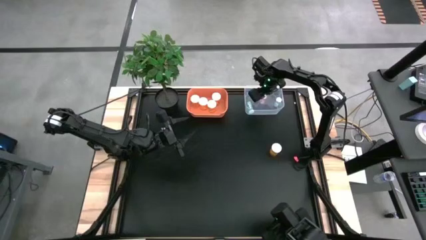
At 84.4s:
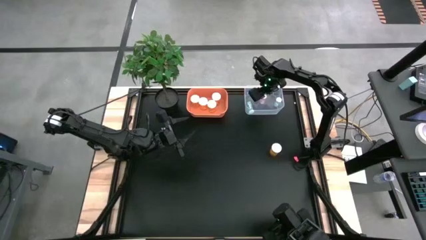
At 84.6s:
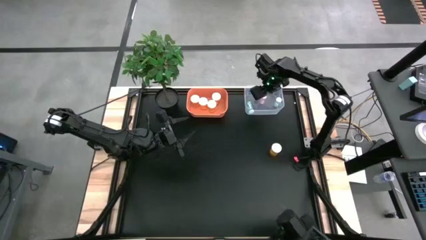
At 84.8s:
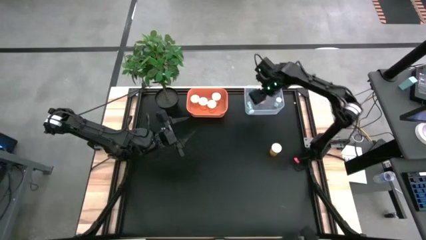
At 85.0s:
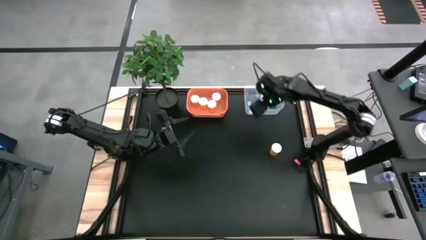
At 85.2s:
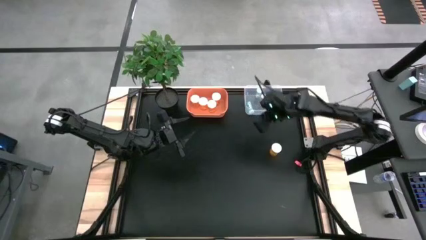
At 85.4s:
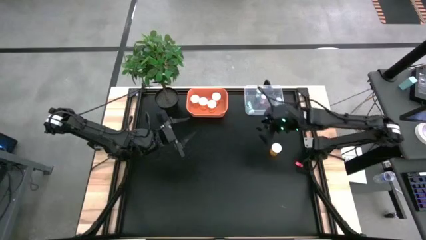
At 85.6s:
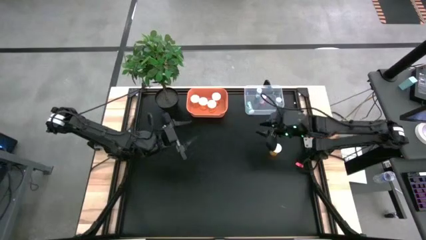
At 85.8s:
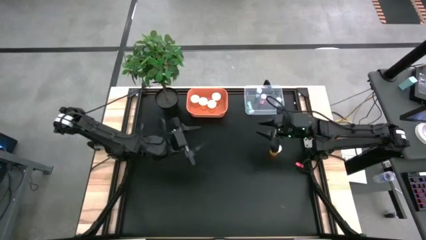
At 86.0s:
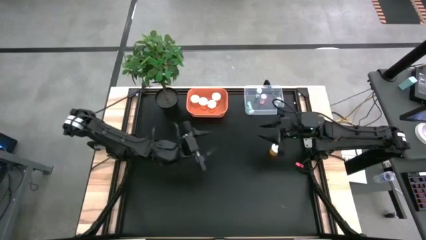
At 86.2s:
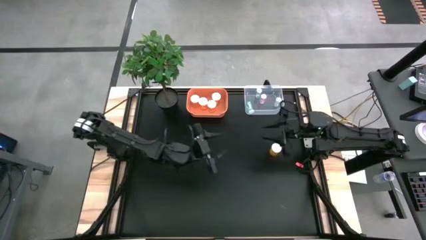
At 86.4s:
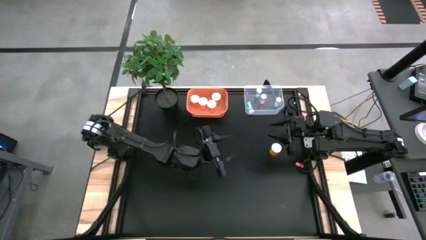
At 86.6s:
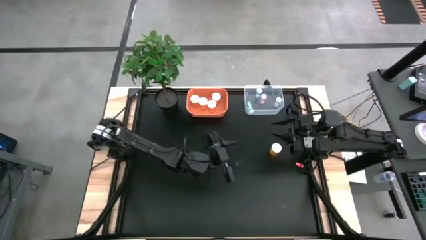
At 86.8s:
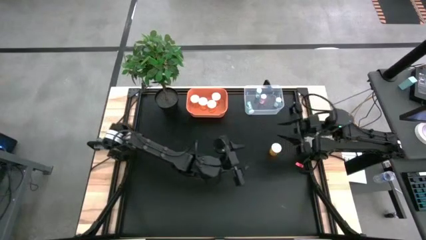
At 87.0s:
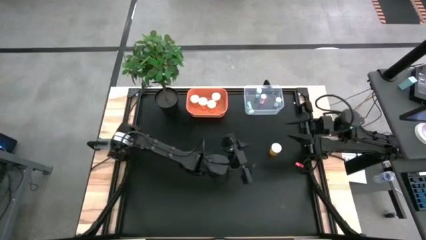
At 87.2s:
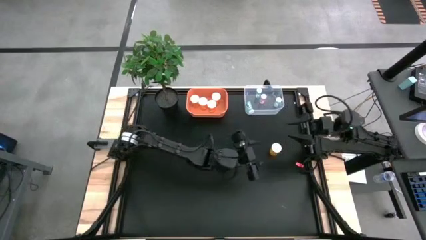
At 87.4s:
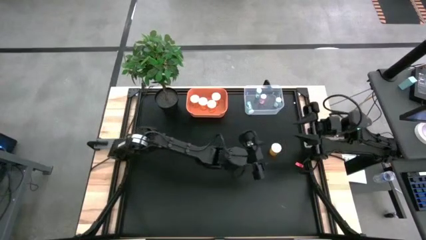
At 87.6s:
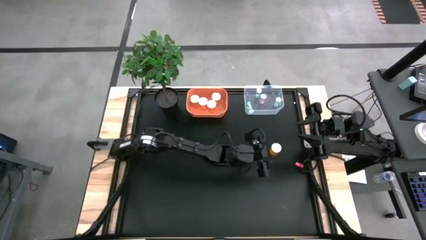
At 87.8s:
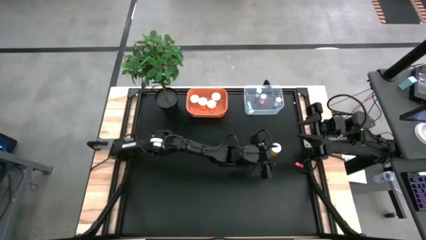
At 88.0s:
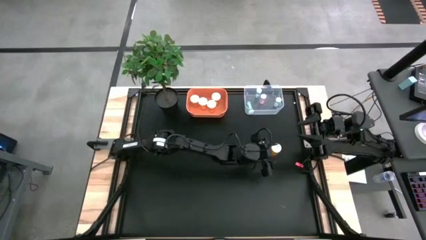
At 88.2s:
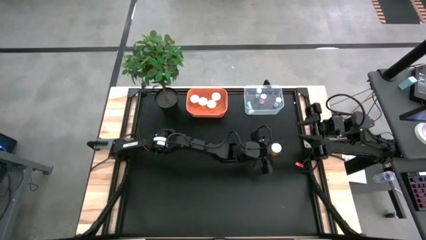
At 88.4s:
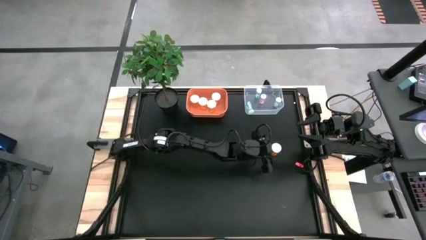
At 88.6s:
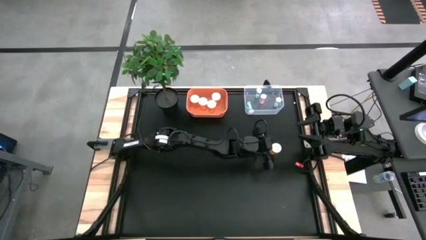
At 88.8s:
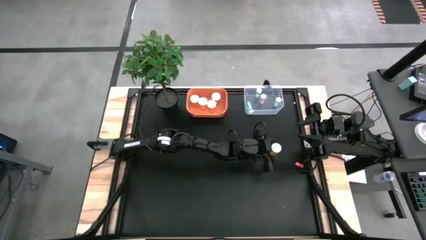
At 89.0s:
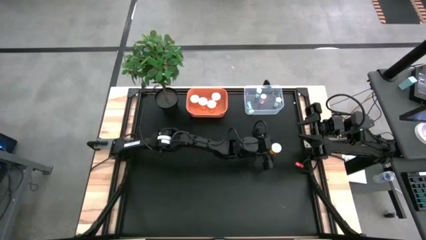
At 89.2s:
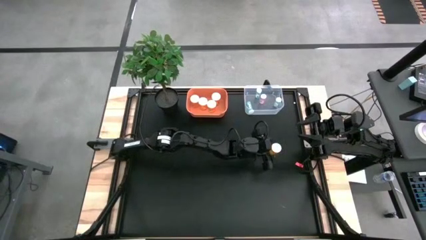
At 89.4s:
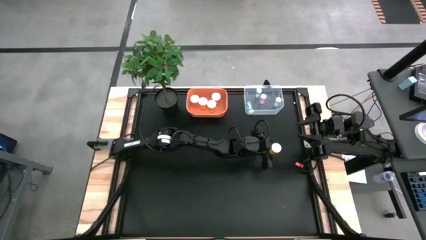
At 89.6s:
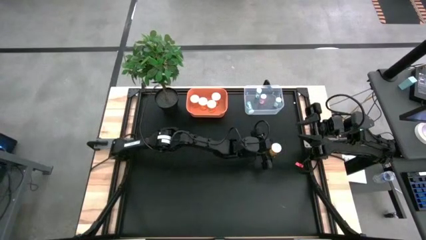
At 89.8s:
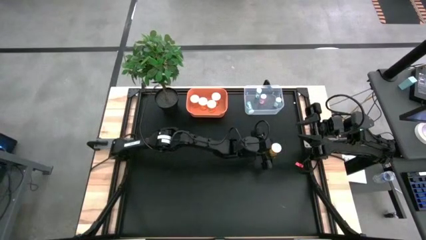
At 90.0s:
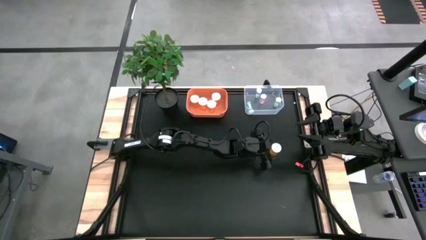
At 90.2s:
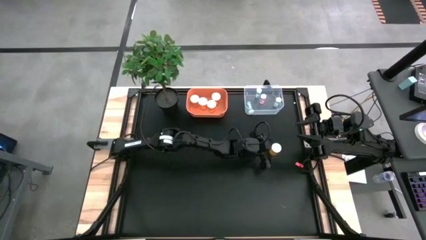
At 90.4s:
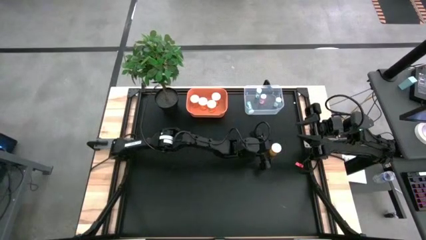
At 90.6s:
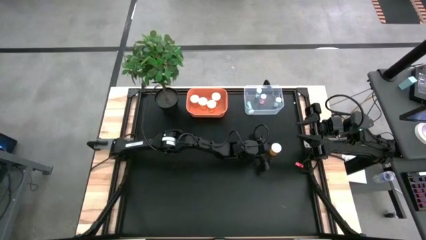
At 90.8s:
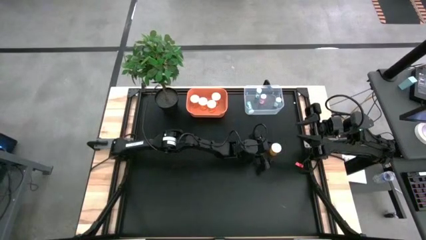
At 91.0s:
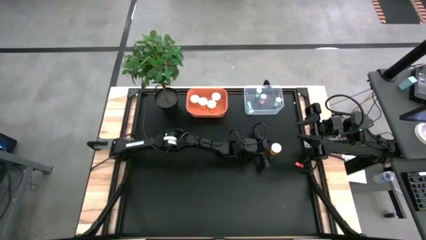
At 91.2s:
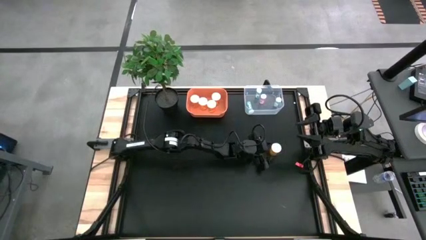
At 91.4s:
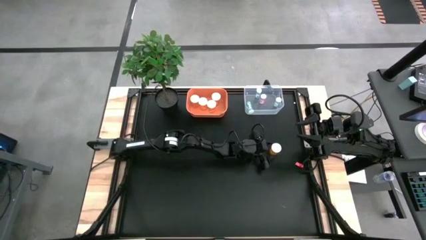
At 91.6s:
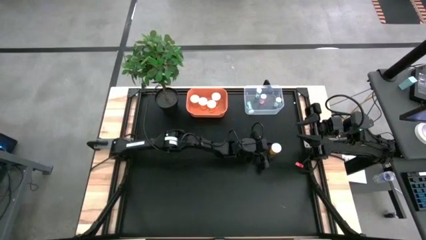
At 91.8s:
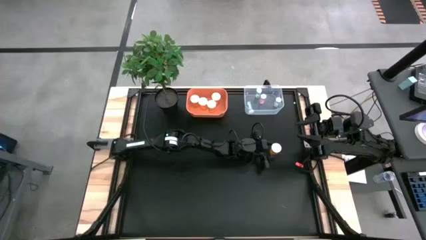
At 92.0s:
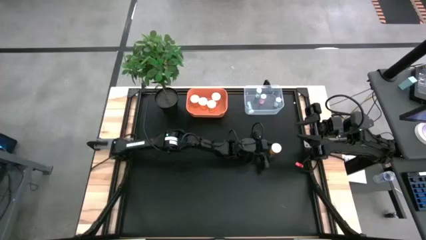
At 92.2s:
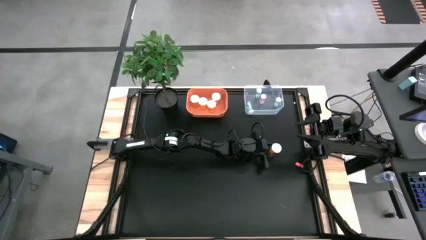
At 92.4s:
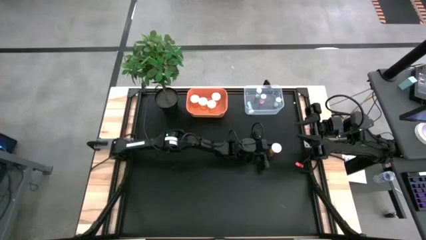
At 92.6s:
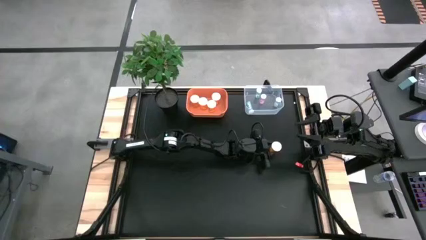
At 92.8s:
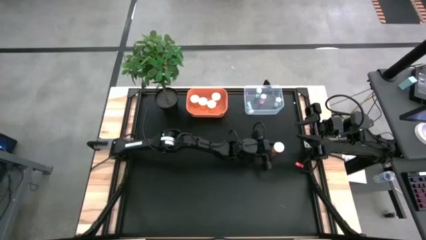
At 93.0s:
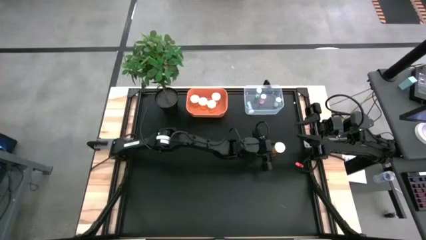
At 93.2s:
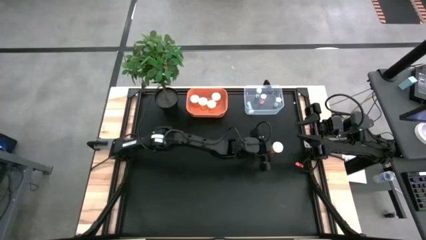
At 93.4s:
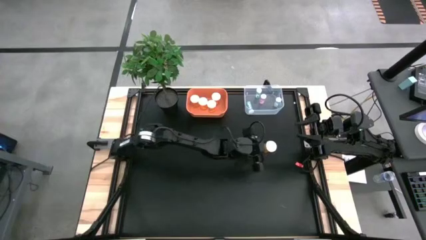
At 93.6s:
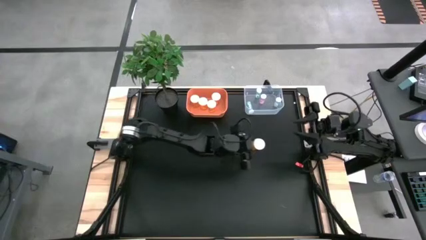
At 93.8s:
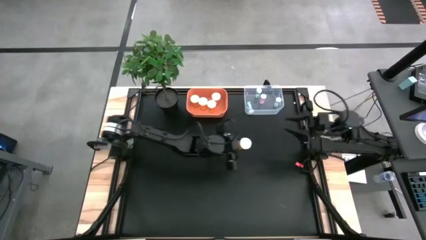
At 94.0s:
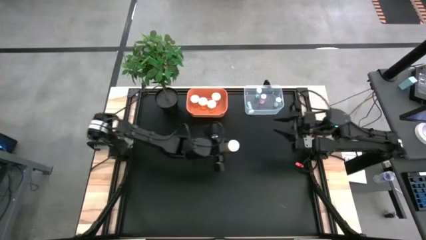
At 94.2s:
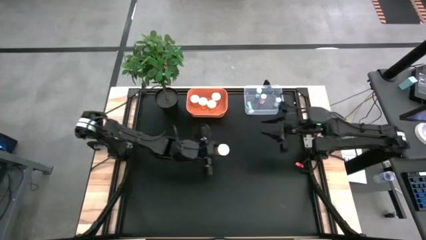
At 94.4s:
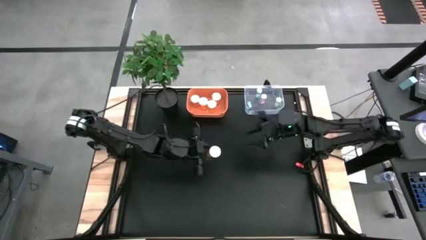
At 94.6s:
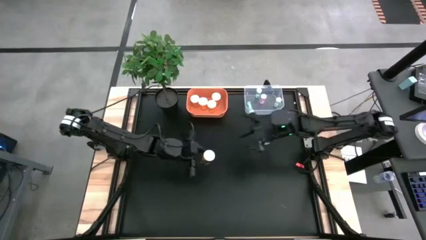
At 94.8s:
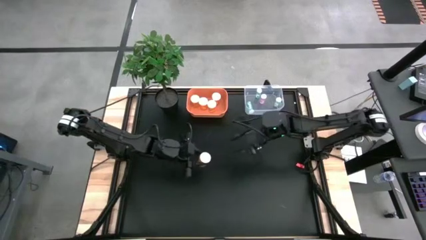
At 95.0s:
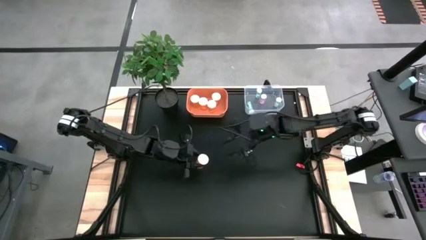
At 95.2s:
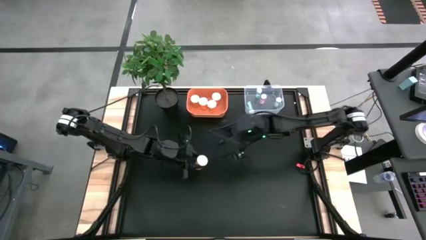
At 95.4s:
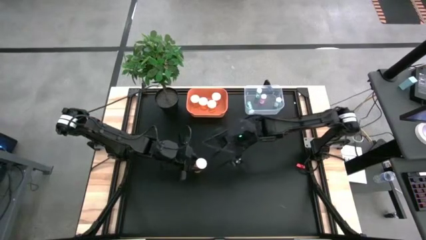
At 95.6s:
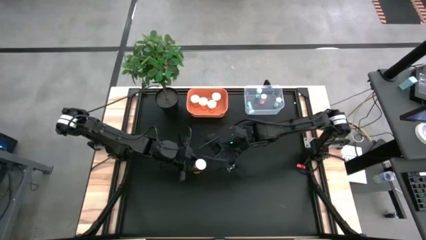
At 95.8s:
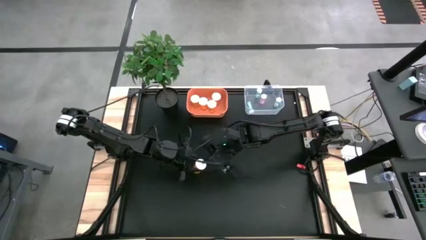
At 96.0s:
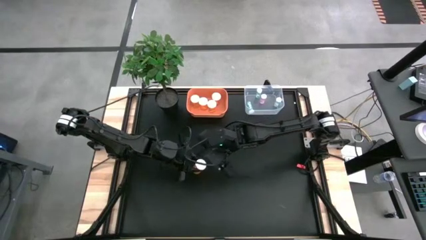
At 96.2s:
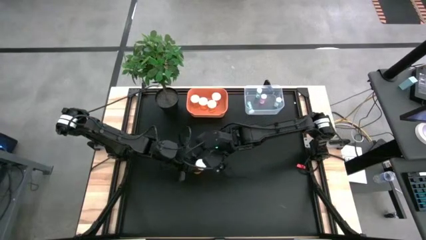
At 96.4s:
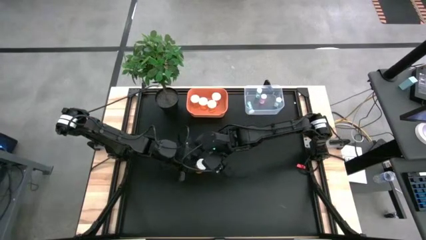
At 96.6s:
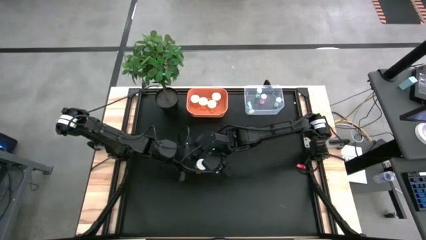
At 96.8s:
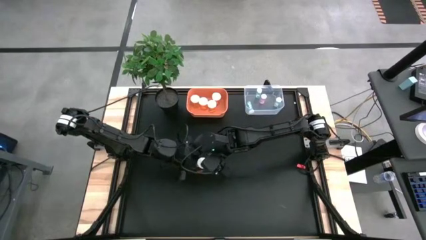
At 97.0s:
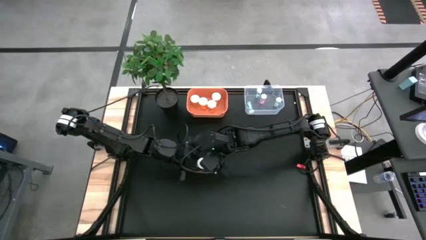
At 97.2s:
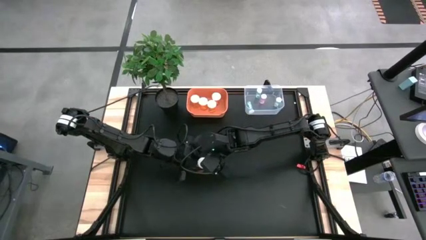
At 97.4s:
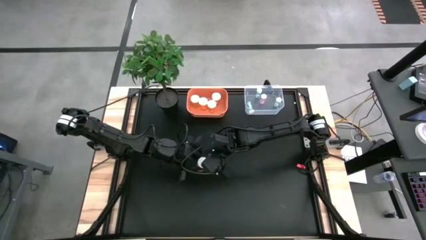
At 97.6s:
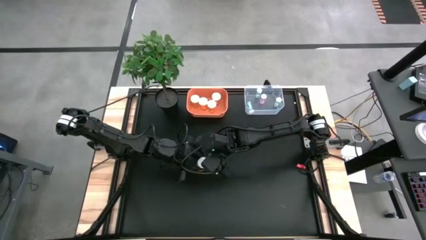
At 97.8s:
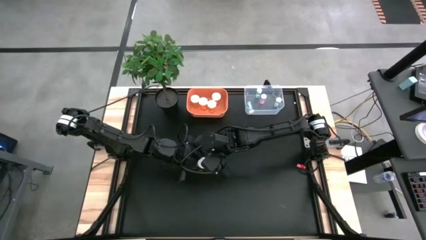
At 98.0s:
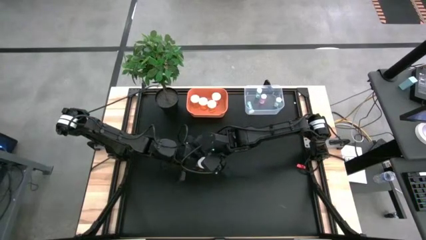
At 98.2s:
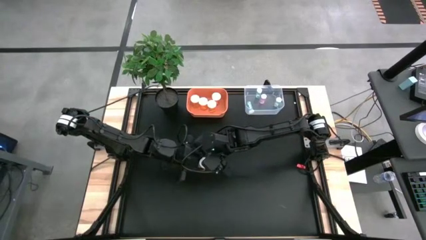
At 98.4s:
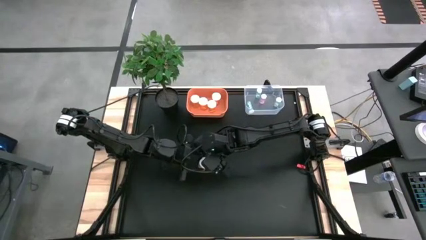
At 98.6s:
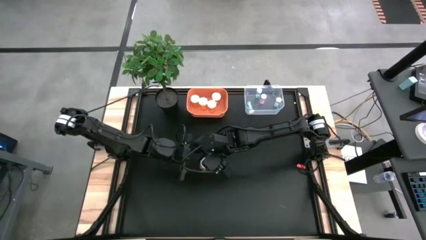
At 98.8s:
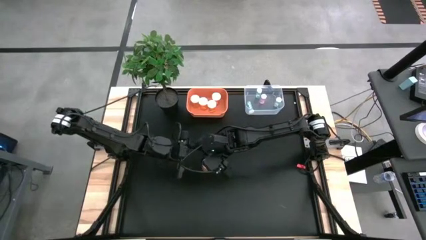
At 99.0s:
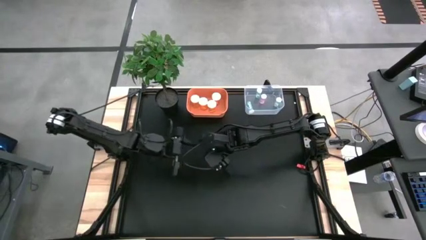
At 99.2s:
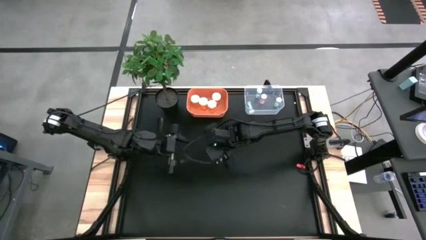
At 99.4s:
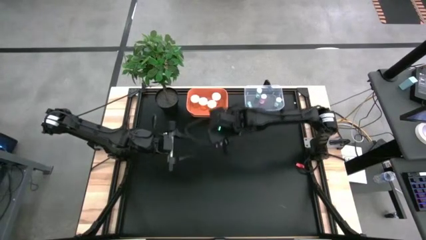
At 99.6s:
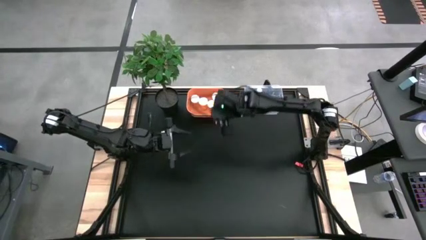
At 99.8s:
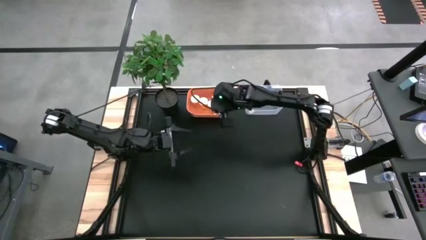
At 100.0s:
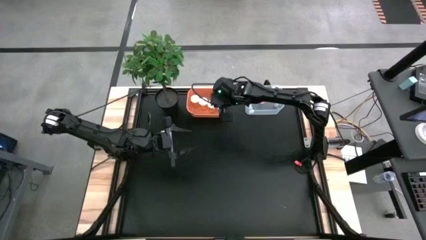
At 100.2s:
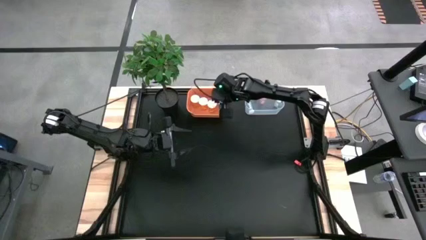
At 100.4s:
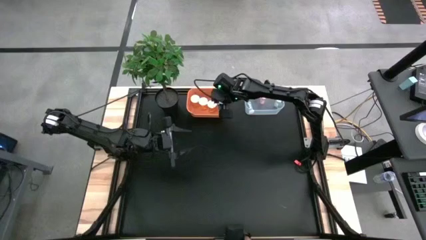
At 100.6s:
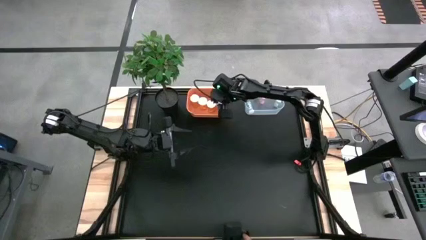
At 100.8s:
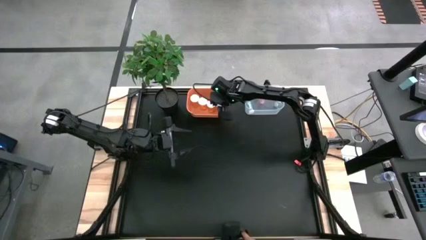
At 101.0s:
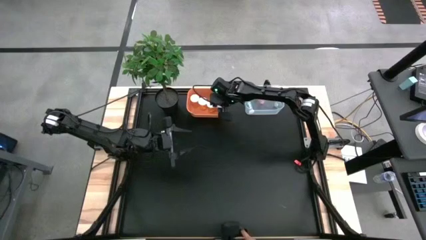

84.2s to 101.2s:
Task: Pick and place medicine bottles into bin by pill shape (circle, oval)
Put the orange pill bottle into the orange bin

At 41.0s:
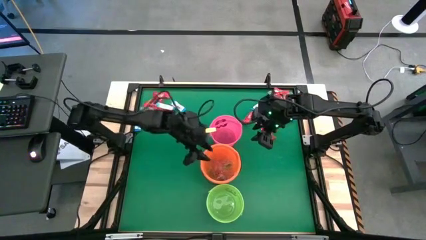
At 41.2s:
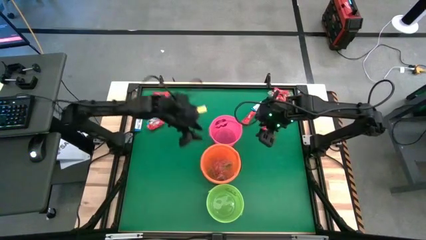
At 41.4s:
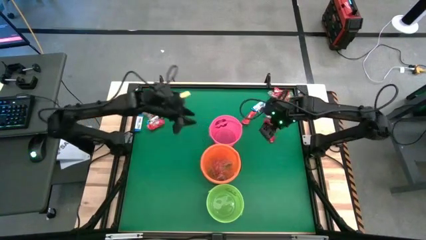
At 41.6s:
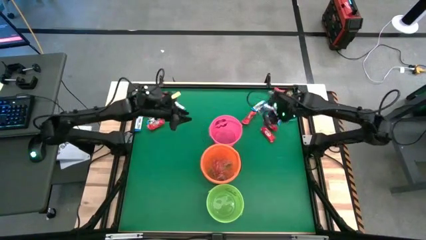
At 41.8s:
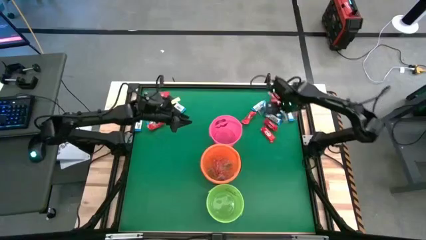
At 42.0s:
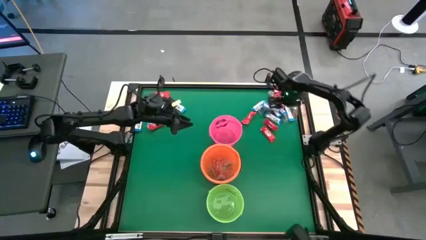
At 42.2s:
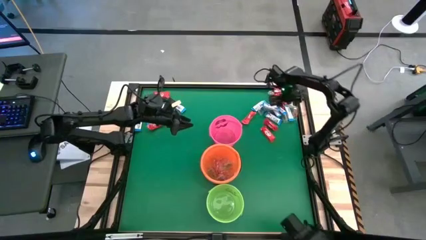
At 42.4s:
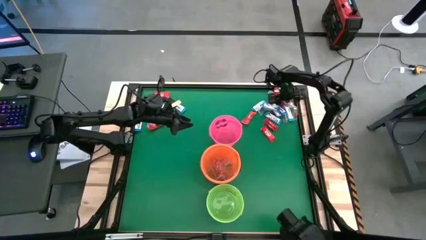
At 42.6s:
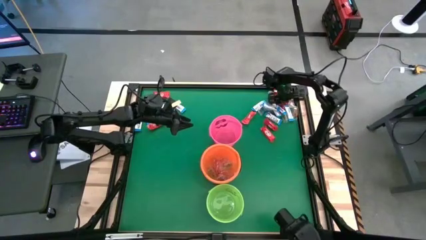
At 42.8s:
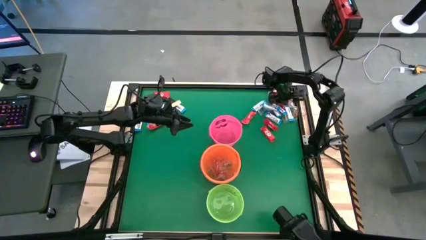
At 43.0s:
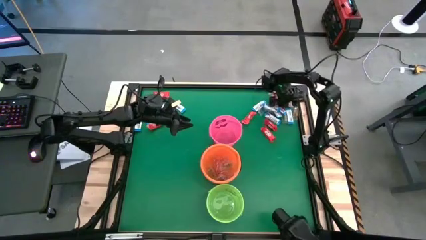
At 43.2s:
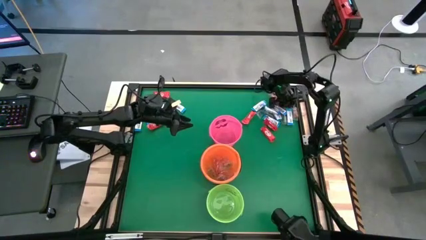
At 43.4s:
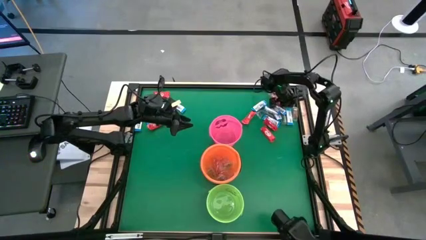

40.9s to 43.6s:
Task: Sort candy by brand, put in halloween buckets
Put the orange gummy into the orange bucket
